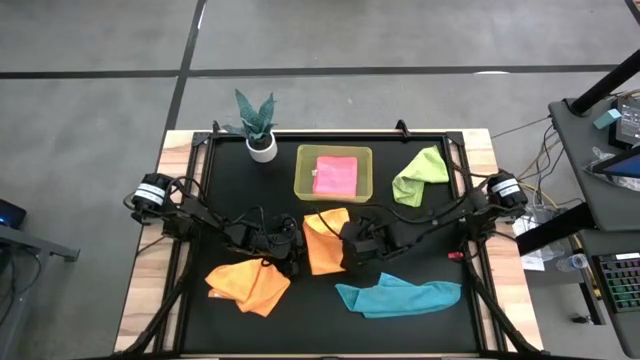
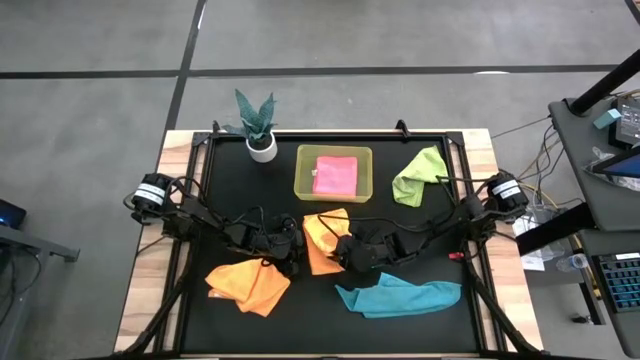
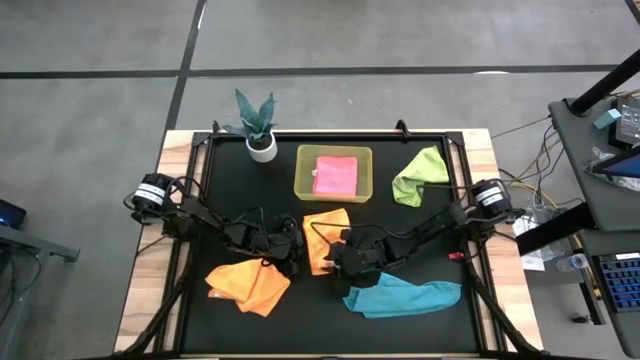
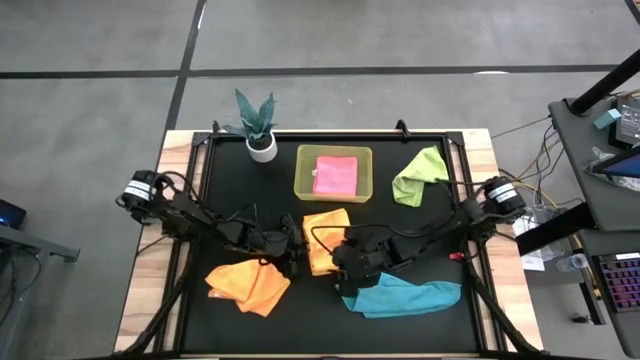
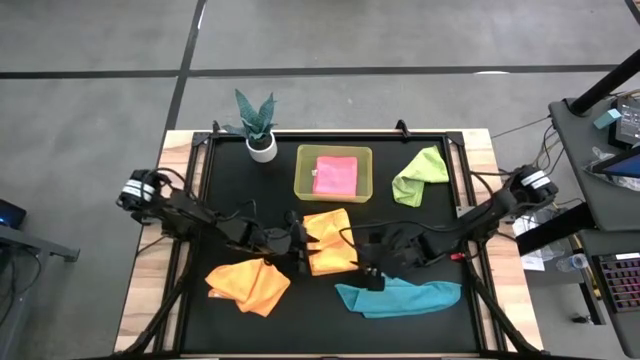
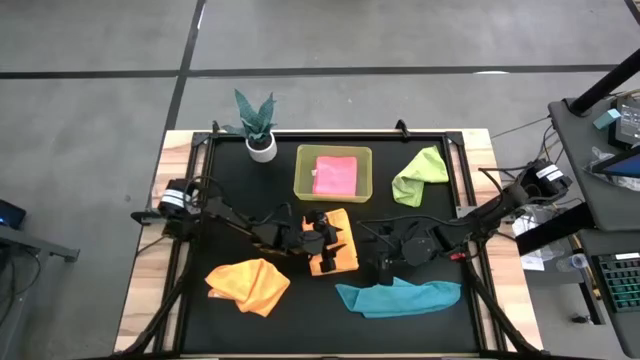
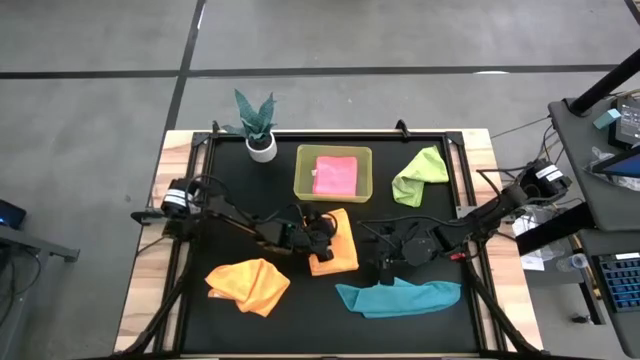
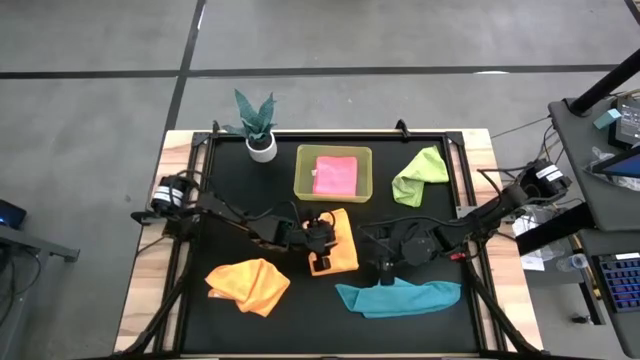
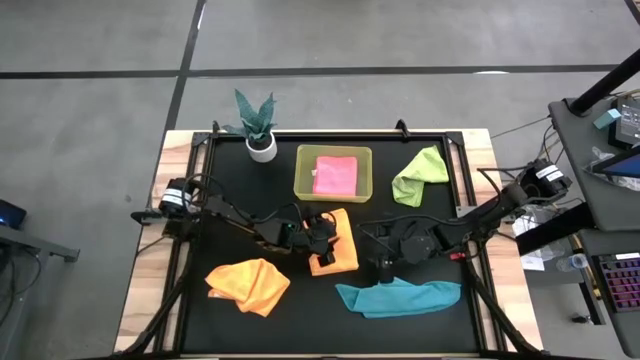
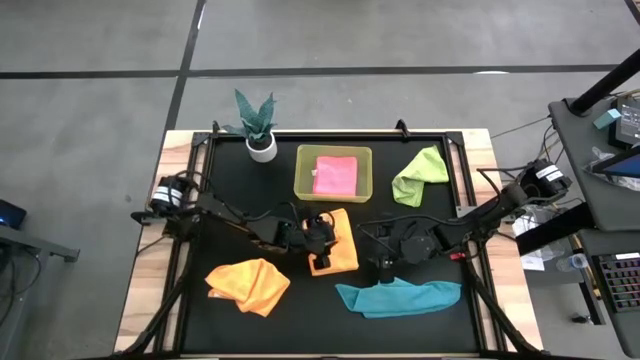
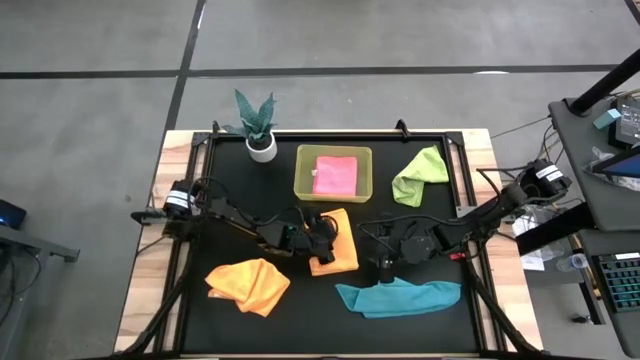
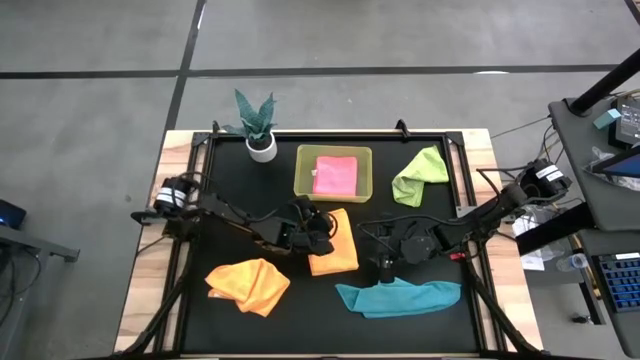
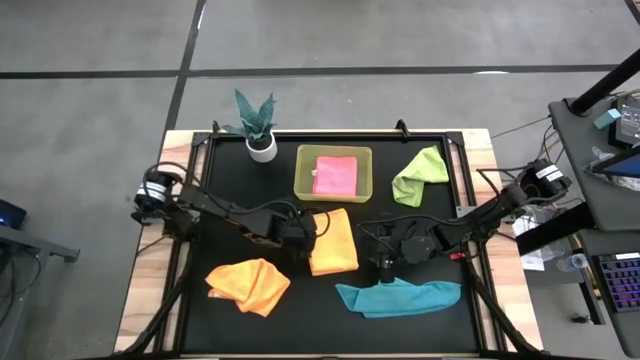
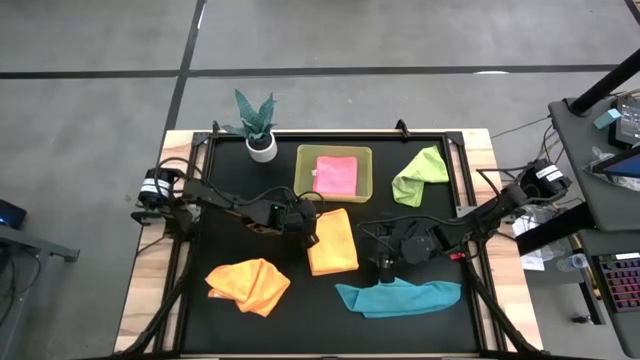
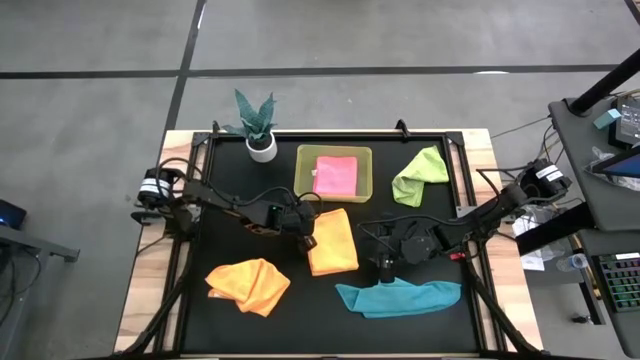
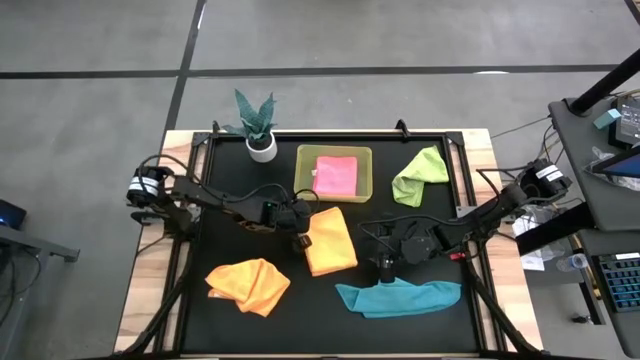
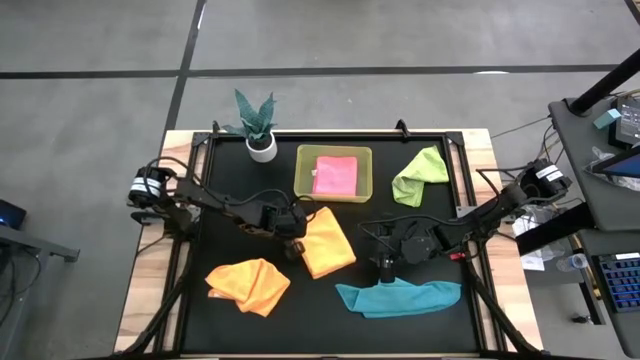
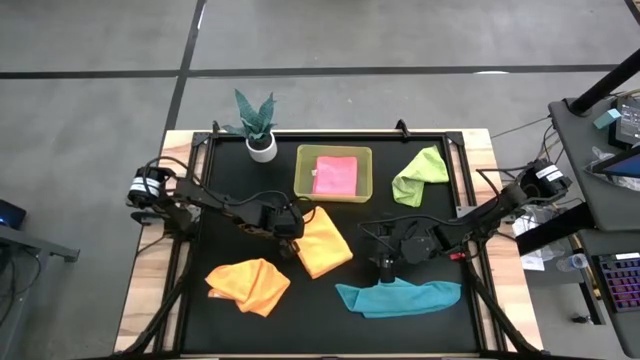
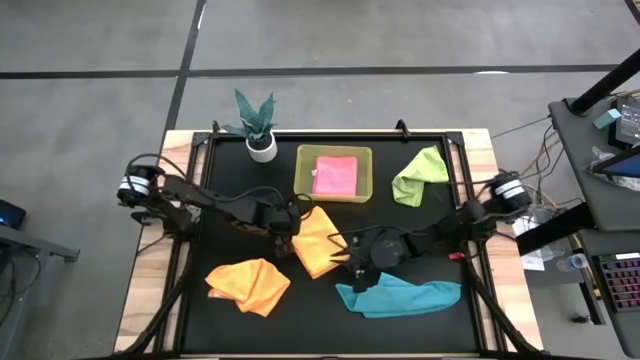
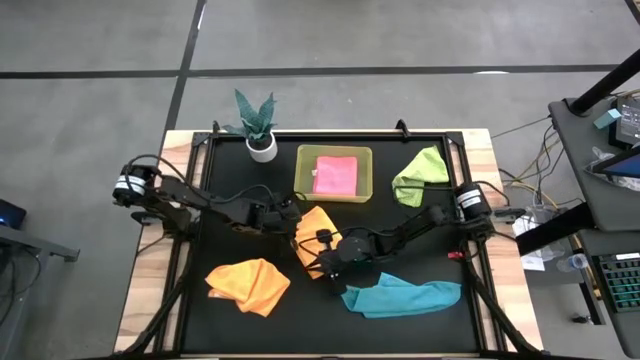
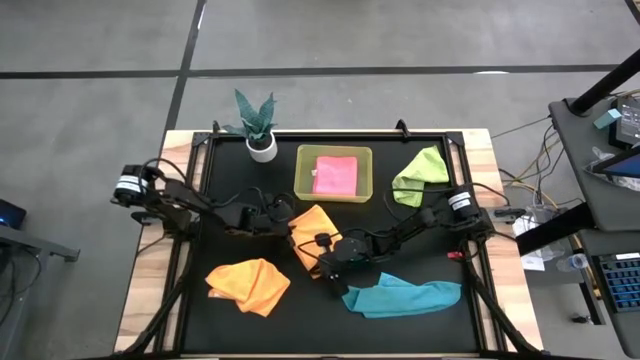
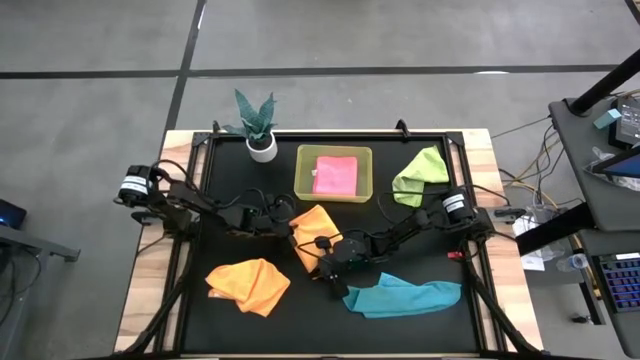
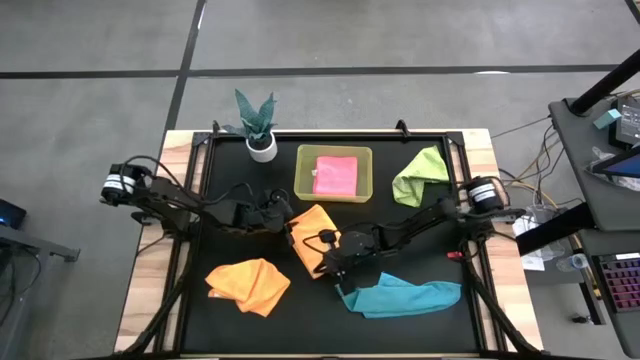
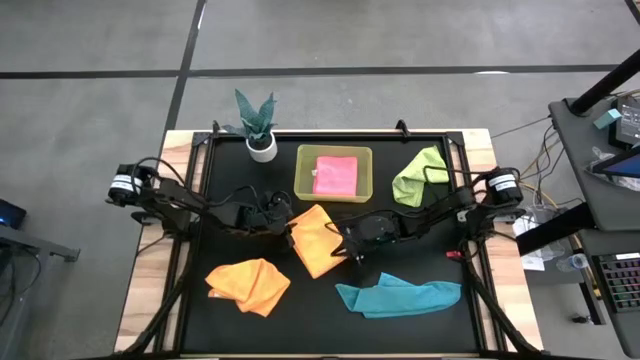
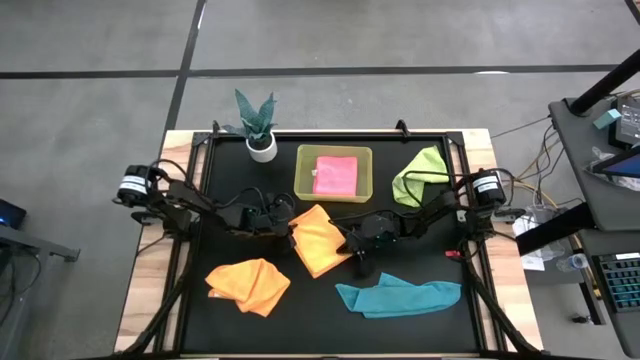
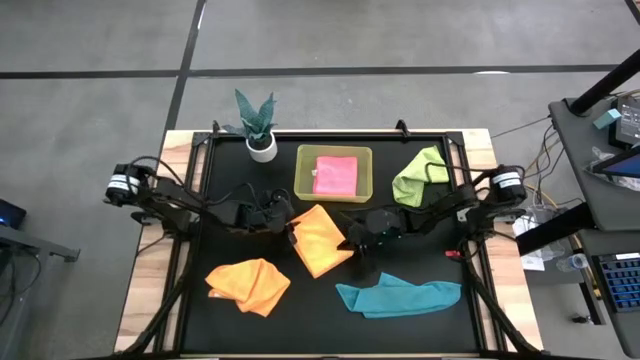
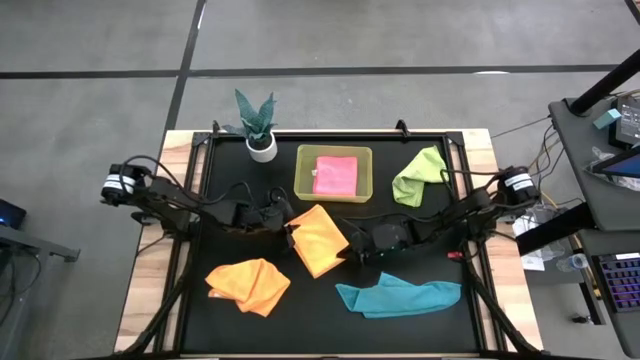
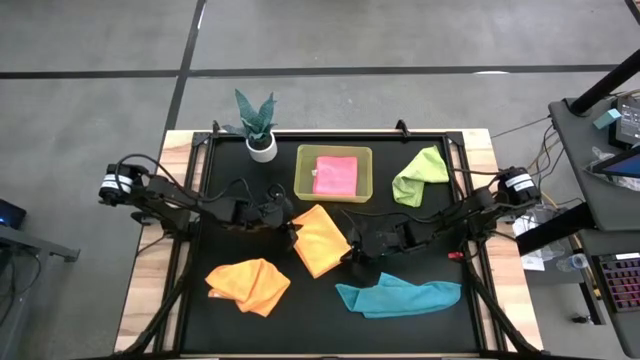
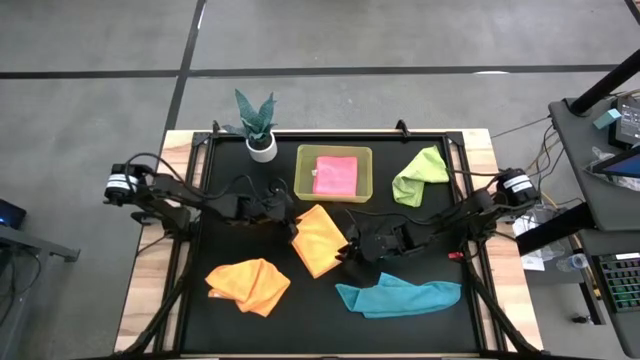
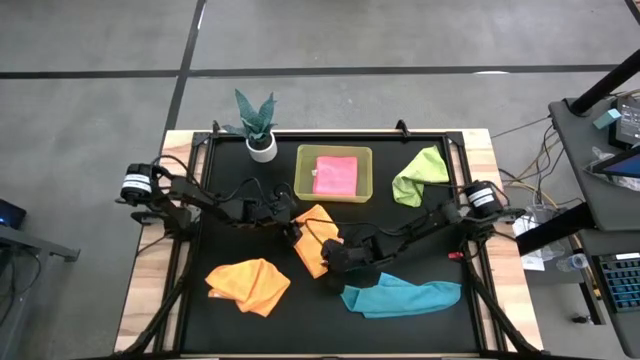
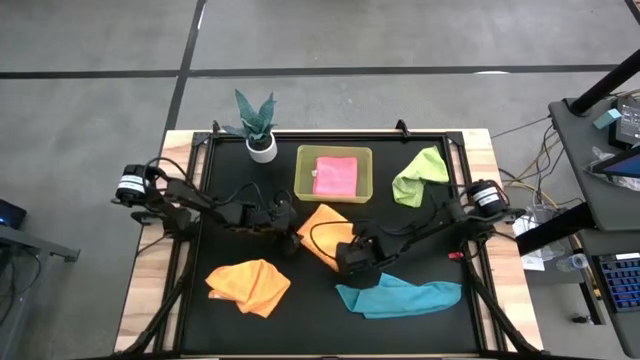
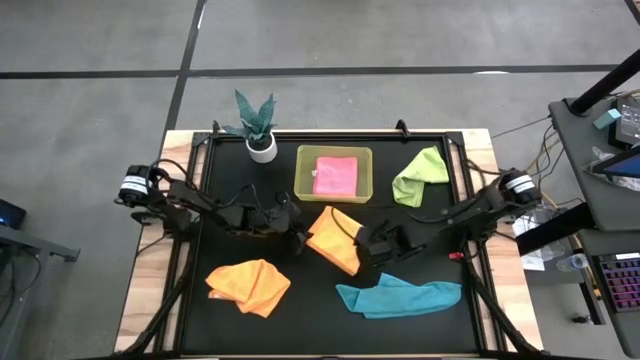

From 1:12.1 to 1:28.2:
Task: Fold microfiber towels
Fold the top yellow towel on the table
